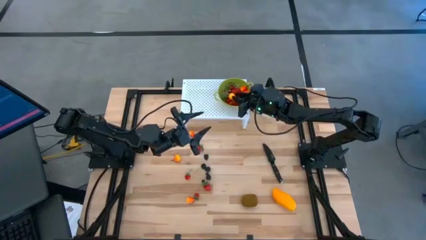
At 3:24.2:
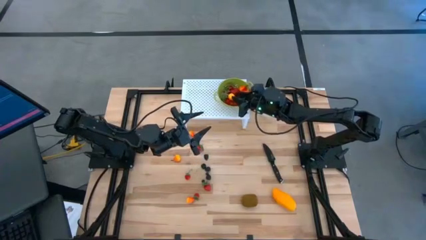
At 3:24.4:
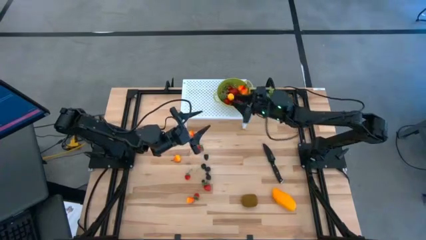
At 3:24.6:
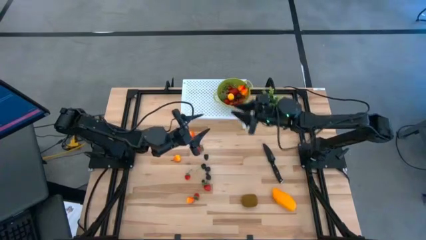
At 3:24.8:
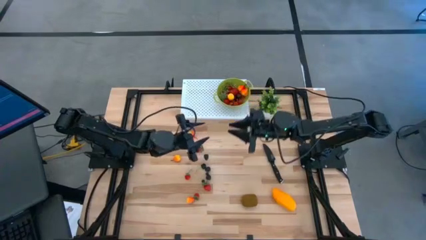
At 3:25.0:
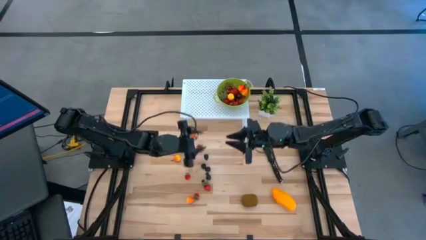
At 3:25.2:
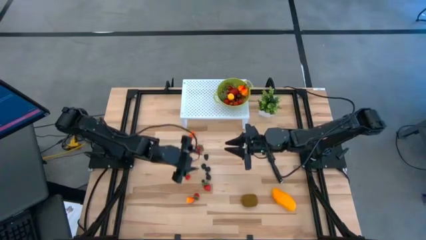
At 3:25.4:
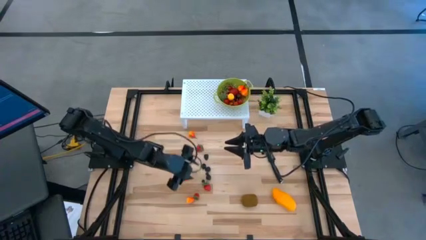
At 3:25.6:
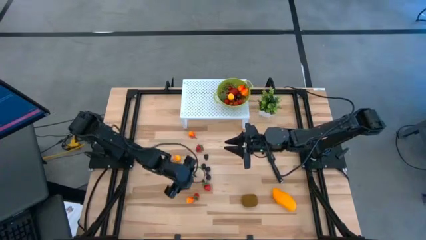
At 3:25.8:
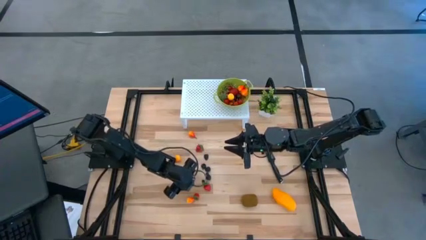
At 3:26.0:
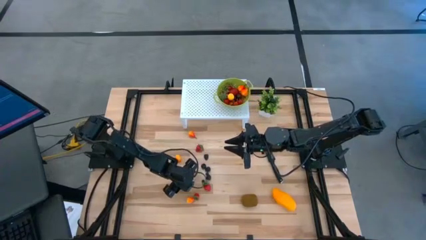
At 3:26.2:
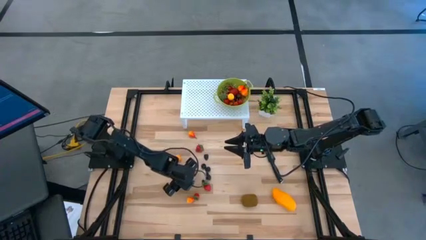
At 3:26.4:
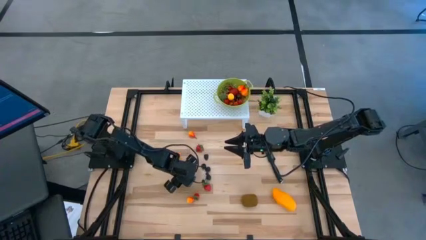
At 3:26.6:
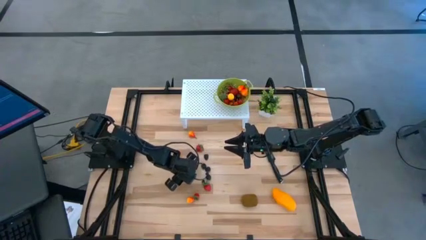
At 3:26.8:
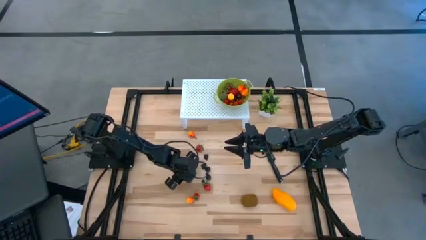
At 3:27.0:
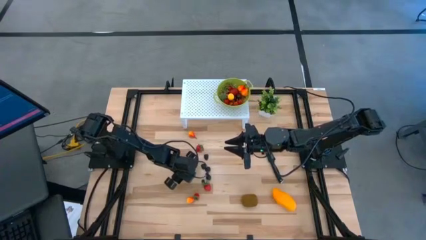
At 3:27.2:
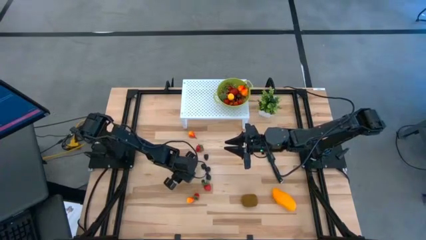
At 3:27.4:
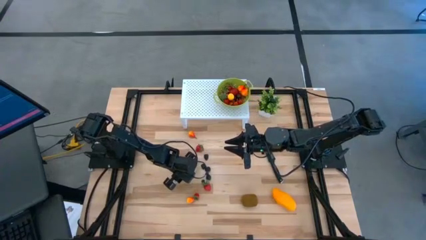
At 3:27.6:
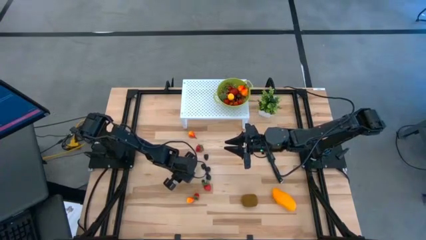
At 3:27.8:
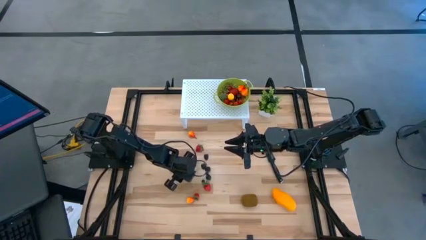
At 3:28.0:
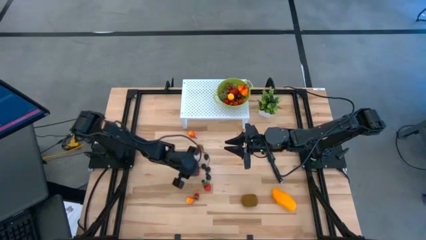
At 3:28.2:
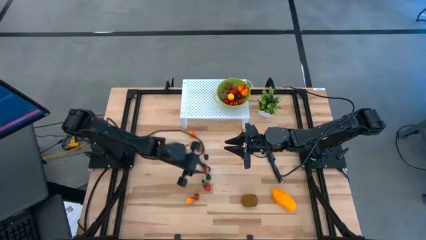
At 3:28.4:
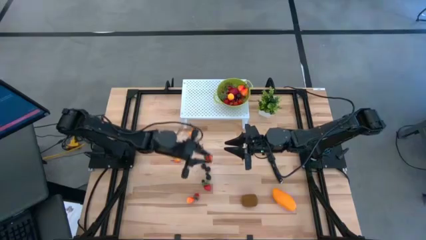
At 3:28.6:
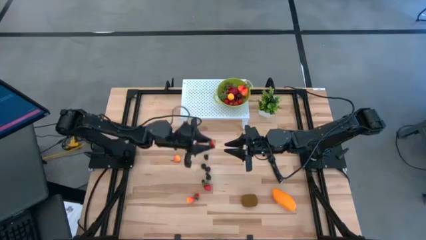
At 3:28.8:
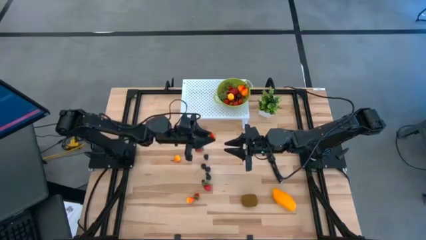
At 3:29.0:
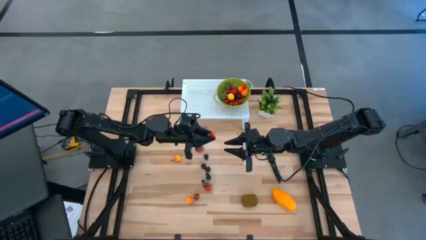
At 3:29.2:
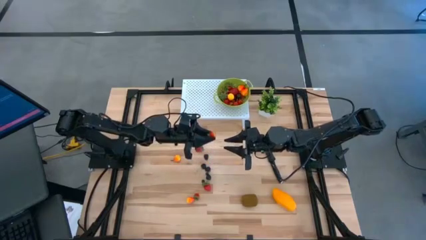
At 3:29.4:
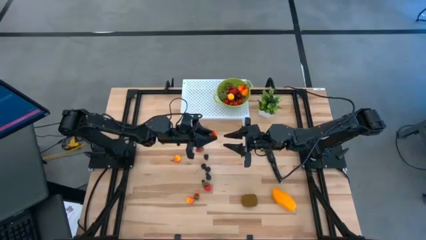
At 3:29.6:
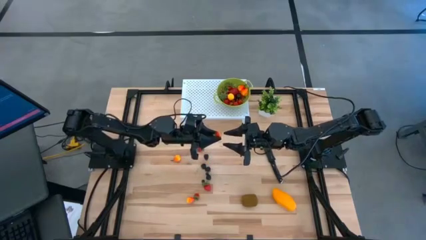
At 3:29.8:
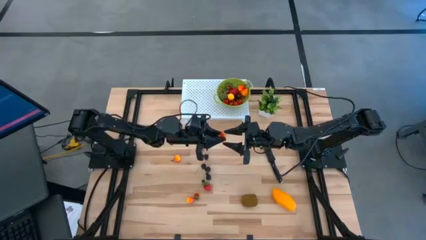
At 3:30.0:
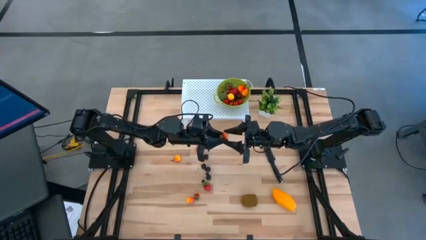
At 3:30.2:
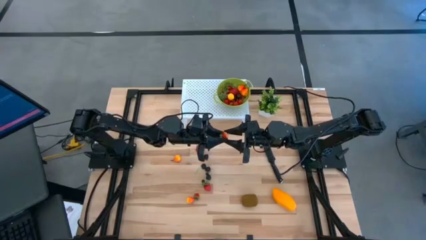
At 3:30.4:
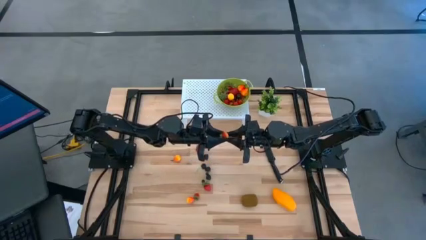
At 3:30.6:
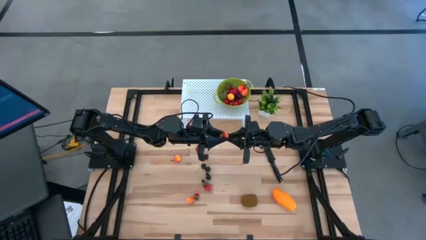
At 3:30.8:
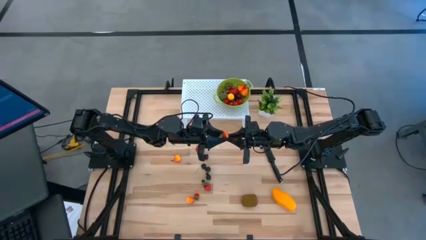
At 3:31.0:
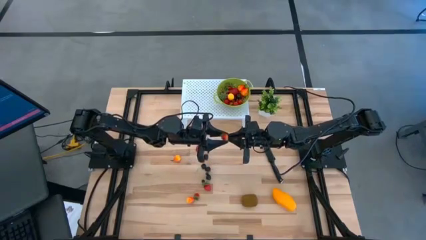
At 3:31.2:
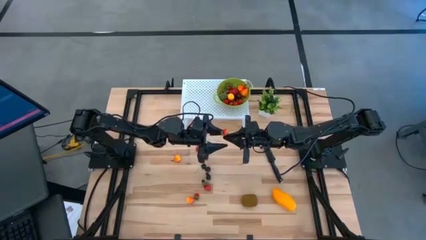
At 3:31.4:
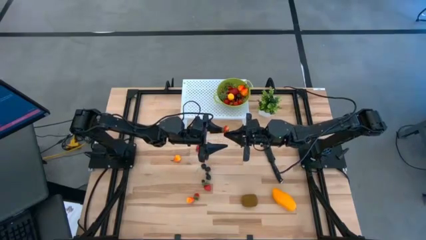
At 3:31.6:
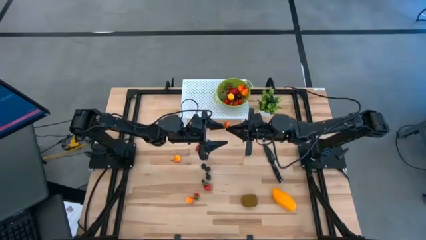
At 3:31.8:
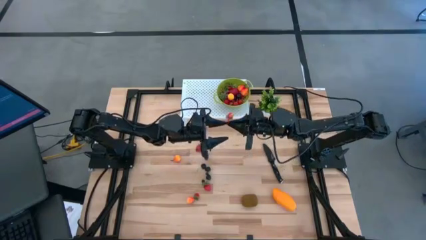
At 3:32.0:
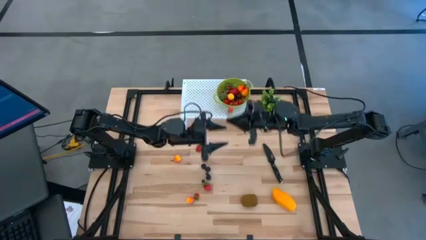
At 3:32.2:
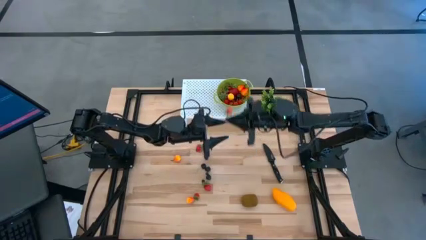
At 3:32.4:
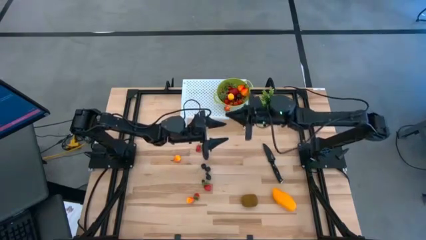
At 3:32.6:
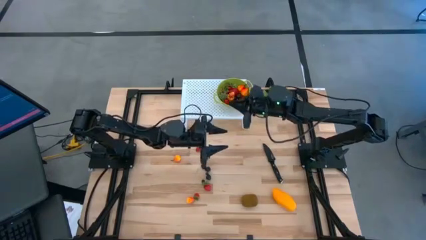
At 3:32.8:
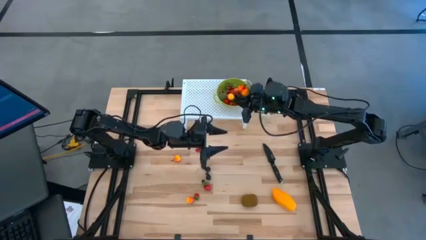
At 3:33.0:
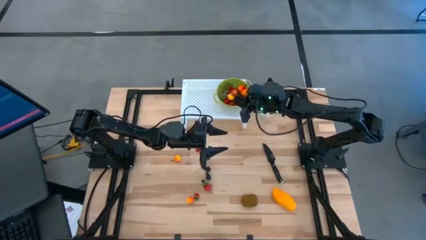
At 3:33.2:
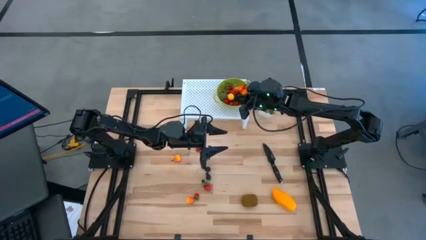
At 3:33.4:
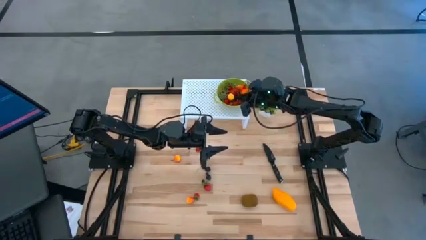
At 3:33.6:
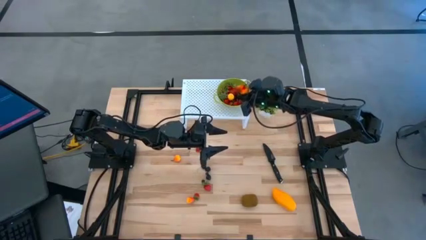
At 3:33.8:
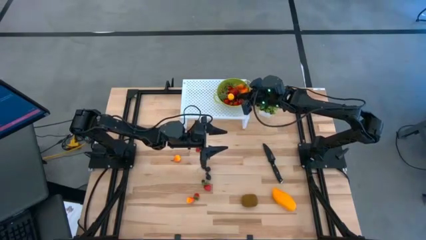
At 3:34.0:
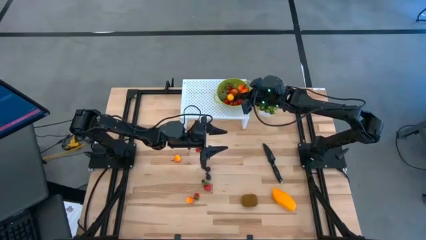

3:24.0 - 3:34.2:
Task: Pick & Place Fruit
Put the red strawberry into the green strainer bowl
